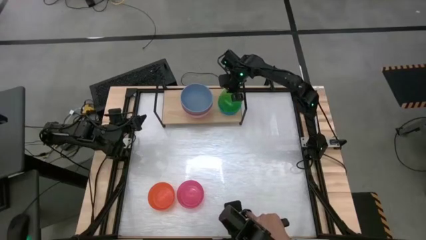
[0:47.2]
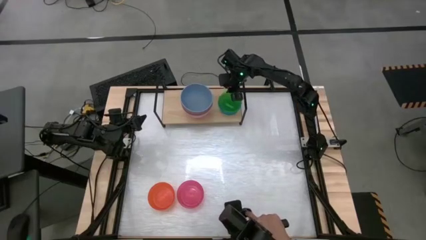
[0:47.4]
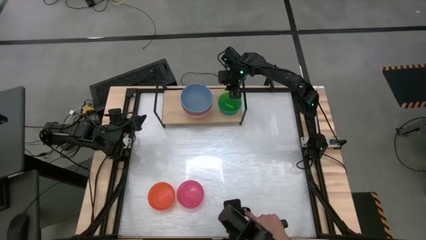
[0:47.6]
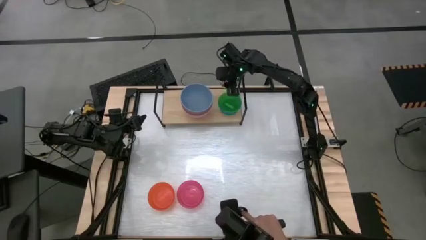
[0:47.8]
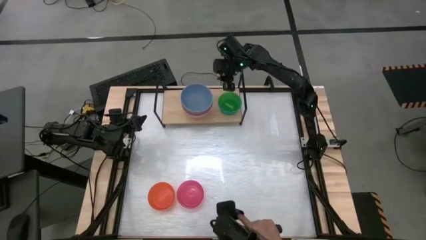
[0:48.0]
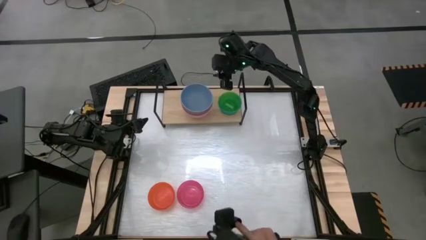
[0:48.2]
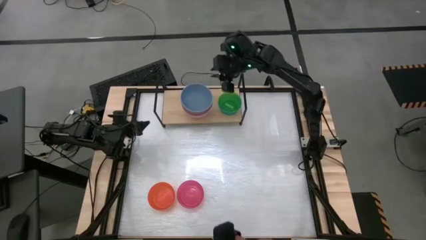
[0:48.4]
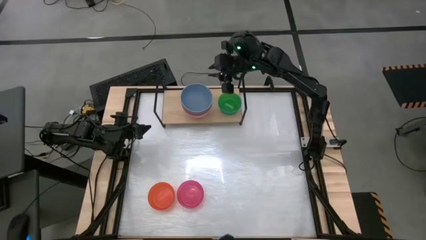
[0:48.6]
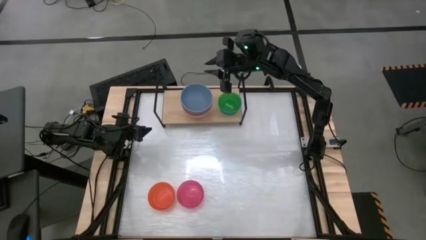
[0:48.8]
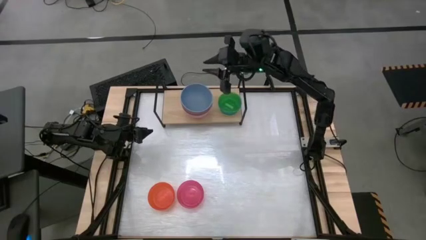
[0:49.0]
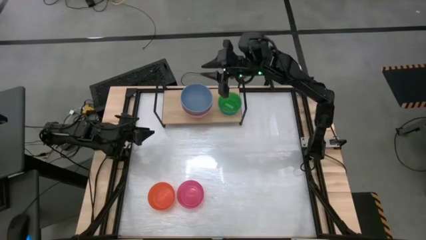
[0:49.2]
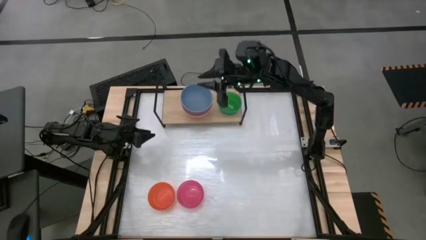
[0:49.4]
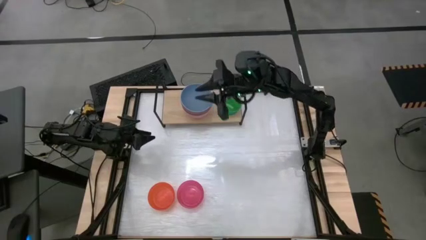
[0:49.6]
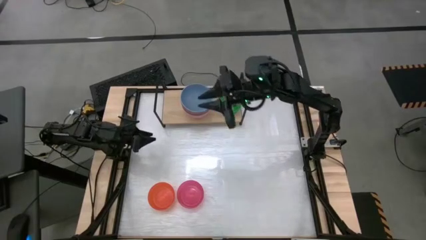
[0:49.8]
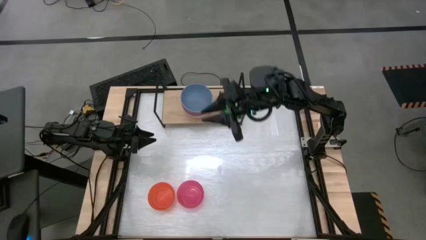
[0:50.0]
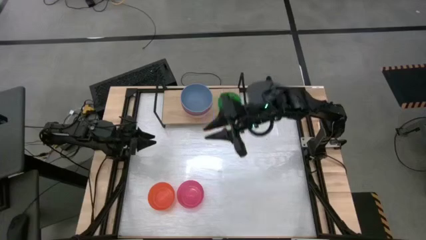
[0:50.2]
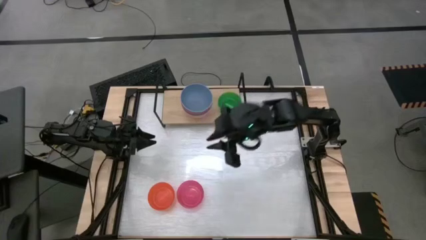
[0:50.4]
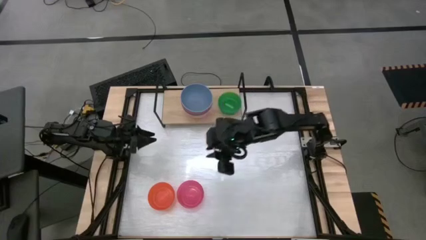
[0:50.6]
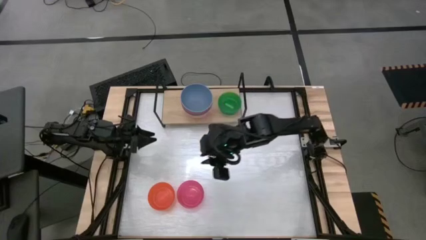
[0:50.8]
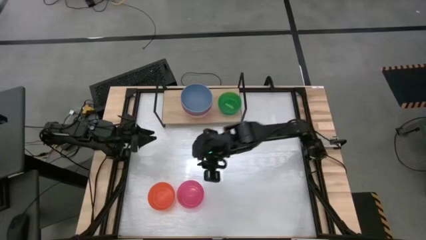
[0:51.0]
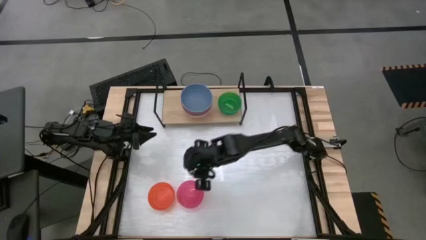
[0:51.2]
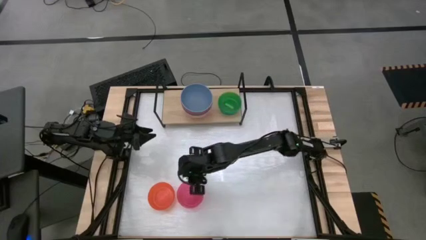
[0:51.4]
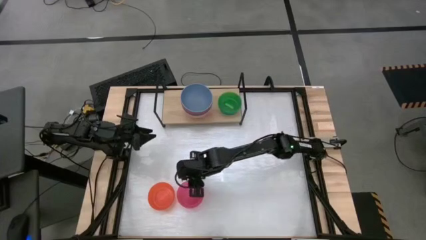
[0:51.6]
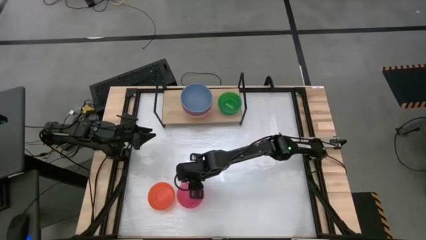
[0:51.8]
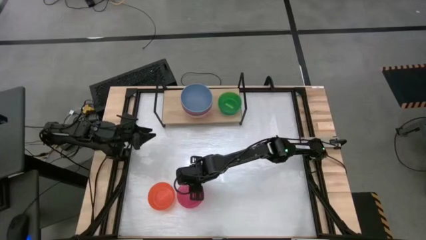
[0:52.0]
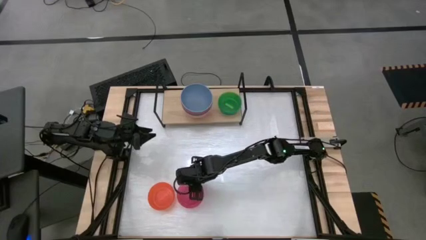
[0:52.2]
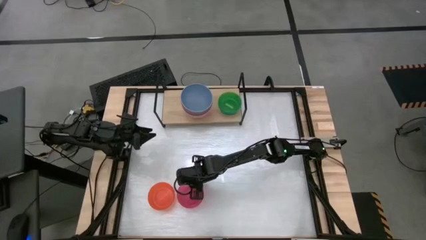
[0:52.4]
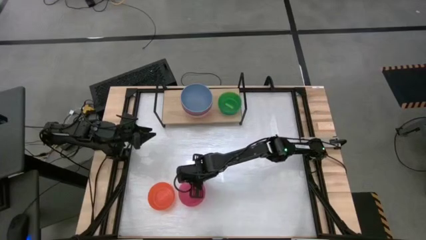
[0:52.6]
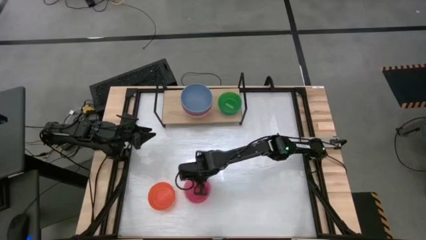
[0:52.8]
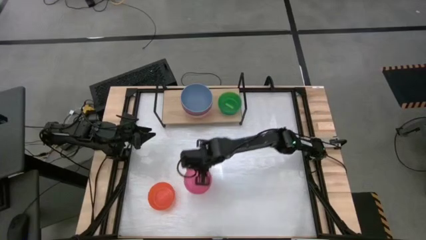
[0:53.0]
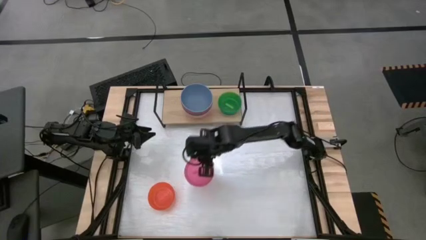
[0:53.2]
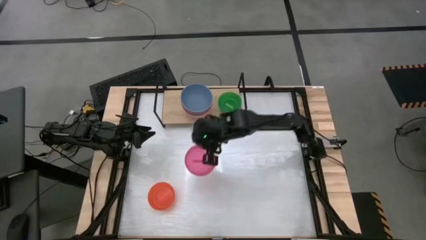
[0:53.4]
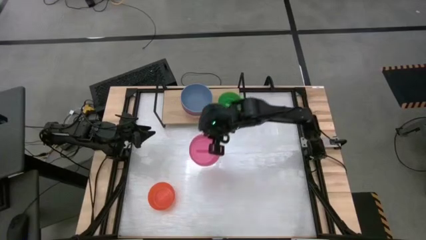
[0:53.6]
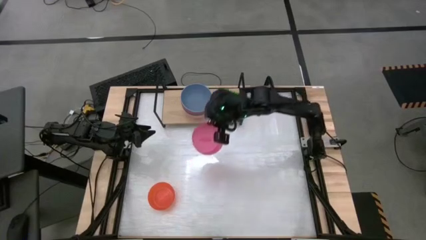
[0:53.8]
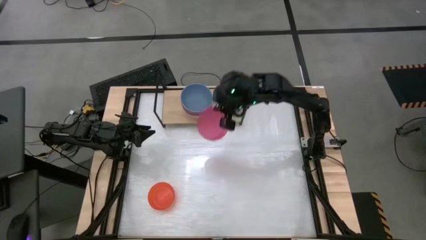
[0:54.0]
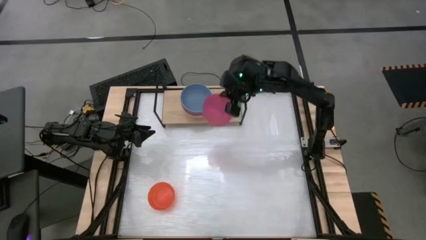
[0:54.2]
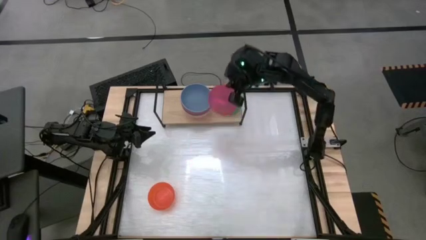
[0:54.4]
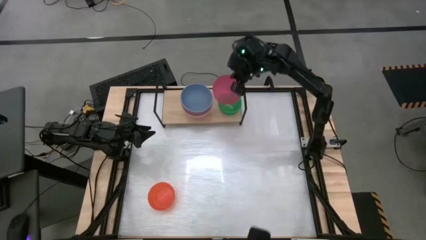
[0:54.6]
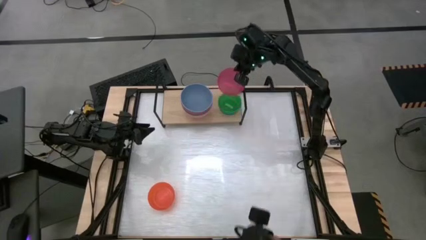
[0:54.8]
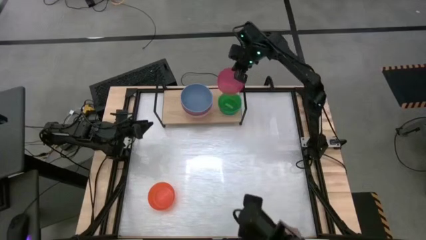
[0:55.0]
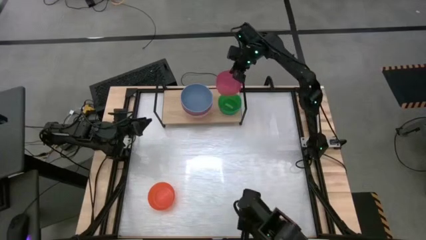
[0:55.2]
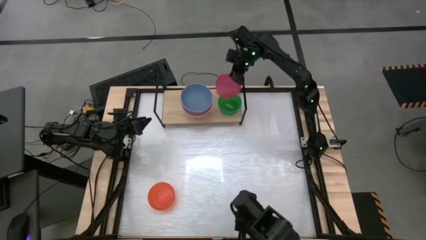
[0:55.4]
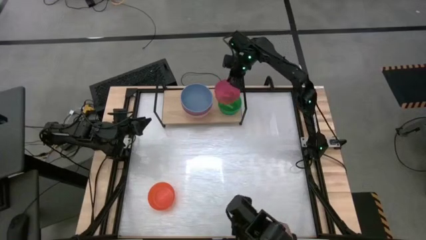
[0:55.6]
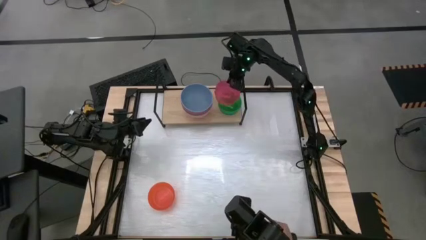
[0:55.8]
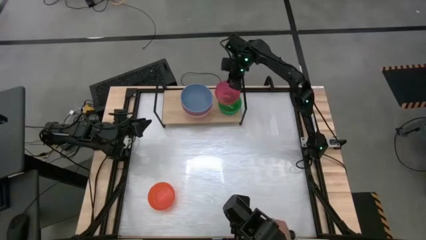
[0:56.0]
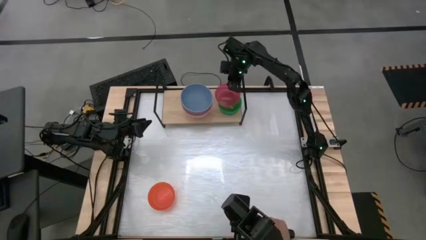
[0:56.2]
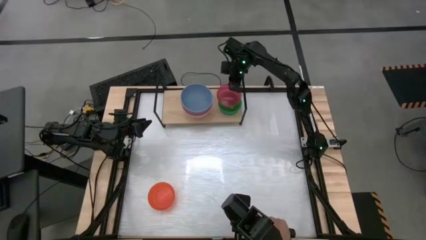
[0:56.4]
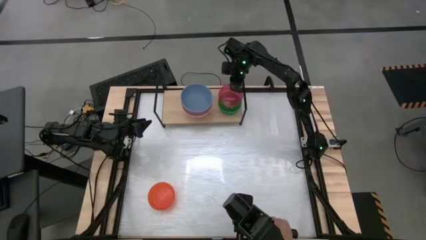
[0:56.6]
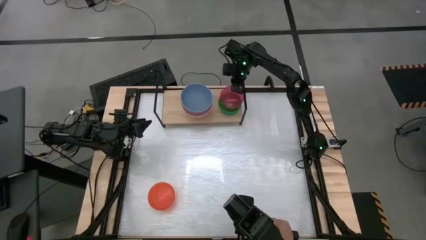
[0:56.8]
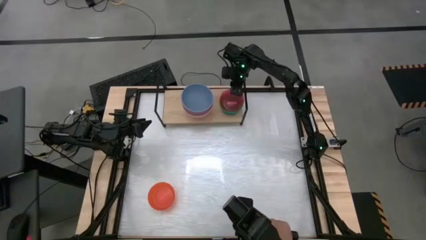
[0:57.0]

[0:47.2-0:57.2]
Task: Place and stack bowls onto a shelf
Stack the pink bowl on top of the green bowl on the shelf

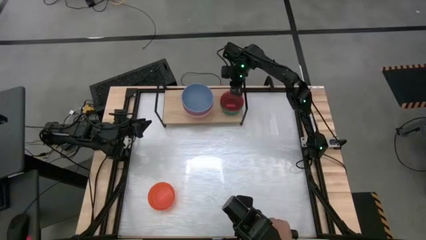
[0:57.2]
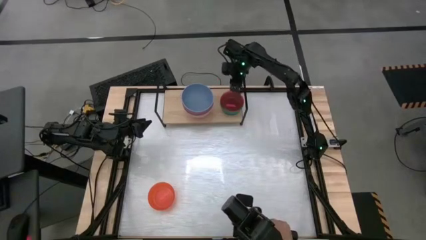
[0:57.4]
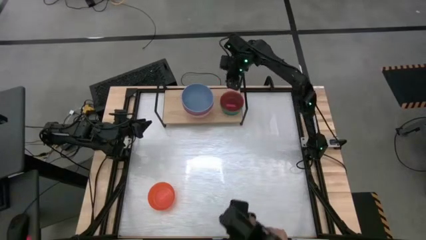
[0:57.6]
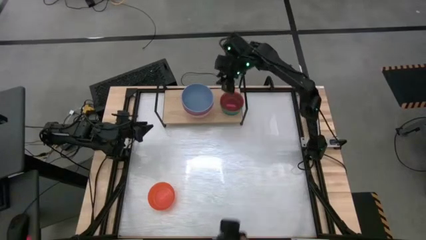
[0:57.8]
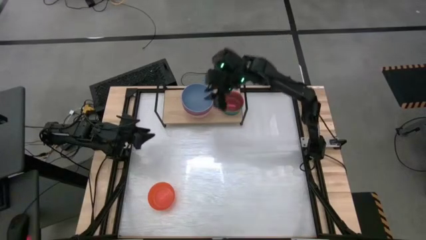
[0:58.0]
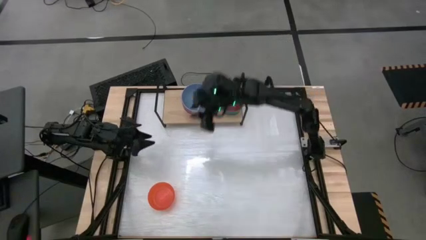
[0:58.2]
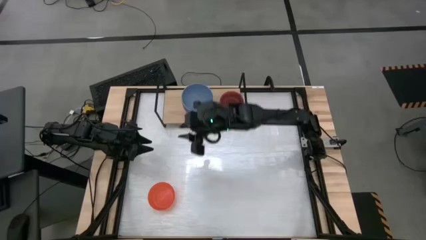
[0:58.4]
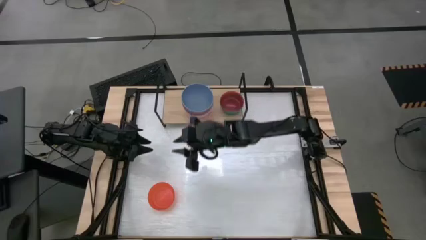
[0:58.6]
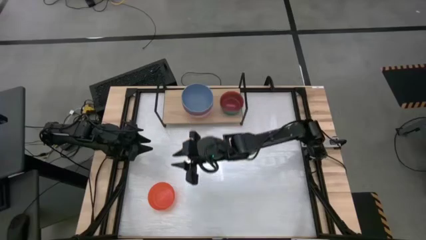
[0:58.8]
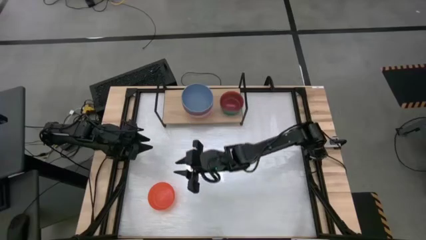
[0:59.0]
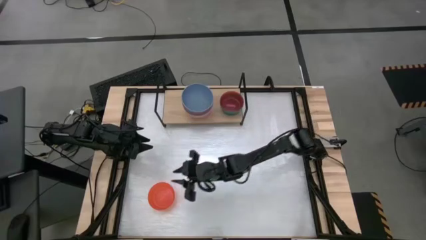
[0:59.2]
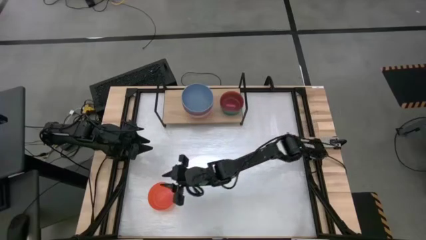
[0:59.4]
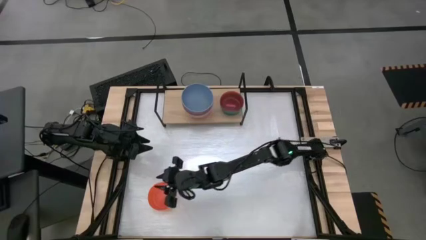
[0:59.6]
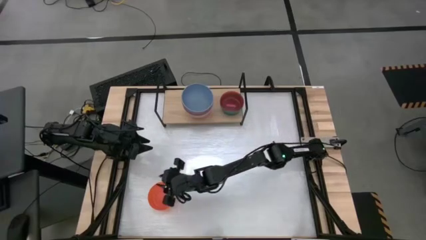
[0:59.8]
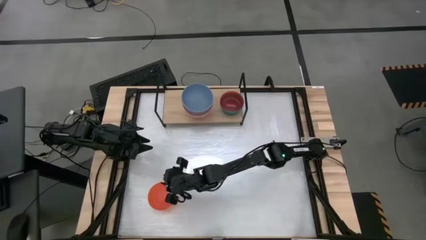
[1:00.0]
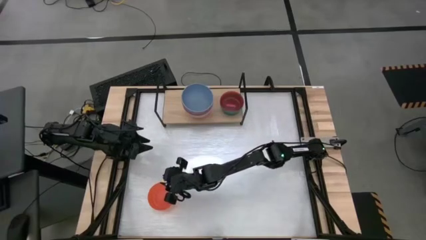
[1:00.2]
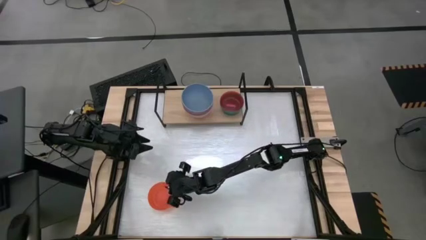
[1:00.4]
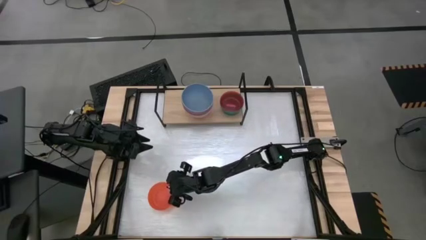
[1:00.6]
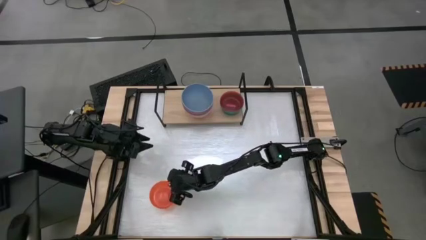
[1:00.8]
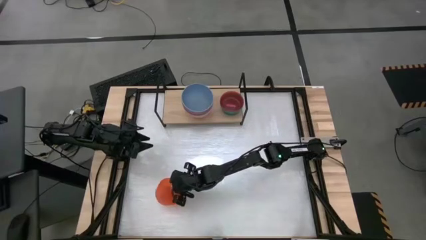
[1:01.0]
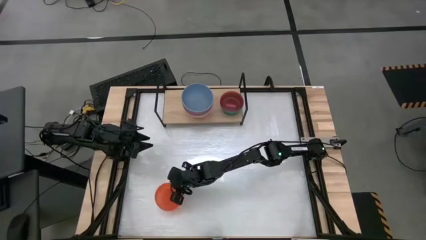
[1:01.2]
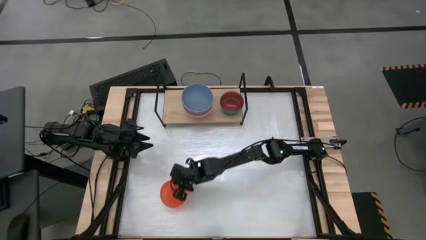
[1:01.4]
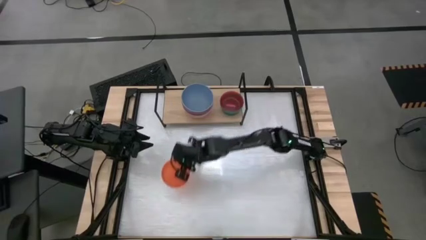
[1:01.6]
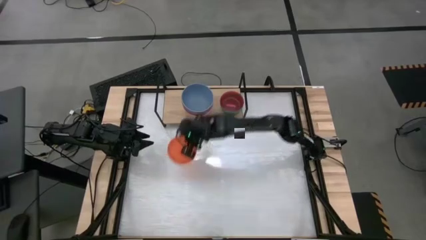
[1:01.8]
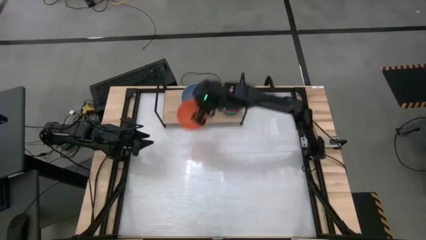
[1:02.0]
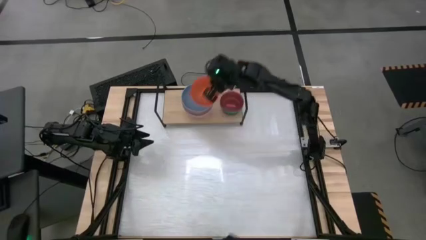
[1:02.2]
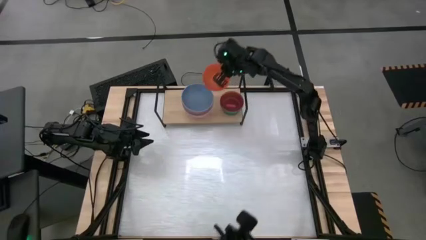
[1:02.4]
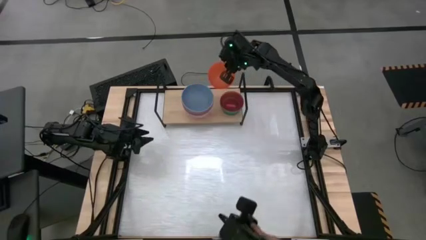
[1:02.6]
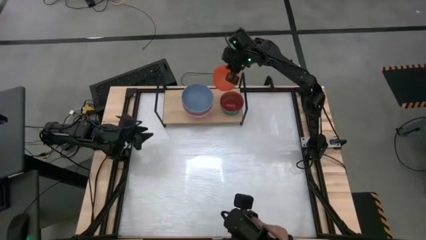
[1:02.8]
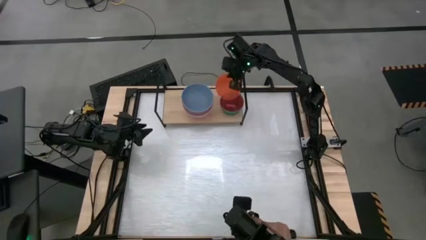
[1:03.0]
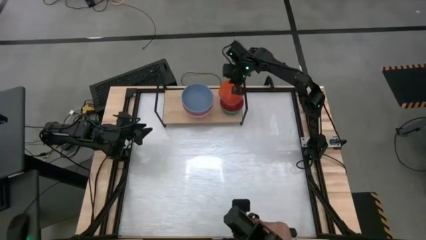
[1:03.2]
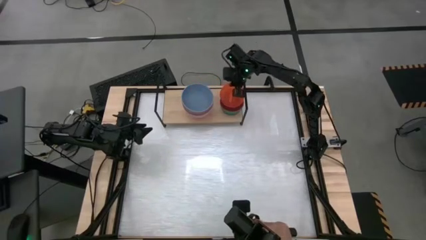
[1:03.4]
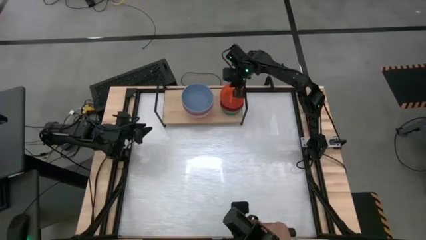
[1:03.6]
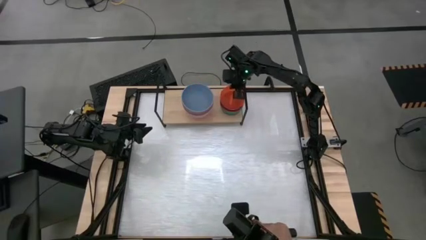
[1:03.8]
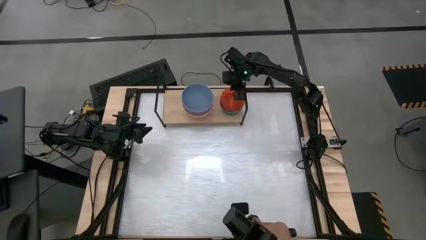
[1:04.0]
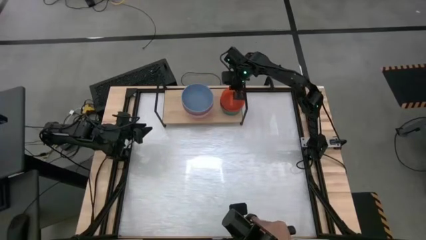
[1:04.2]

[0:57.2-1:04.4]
Stack the orange bowl on top of the pink bowl on the shelf
